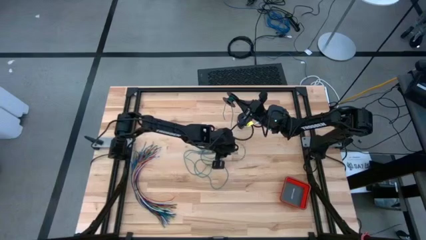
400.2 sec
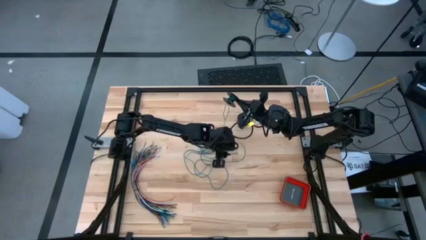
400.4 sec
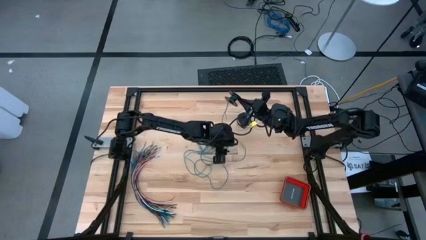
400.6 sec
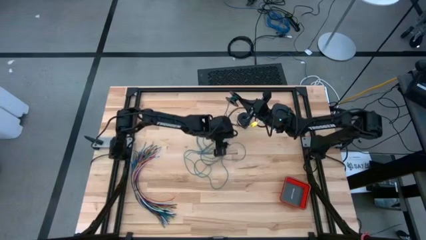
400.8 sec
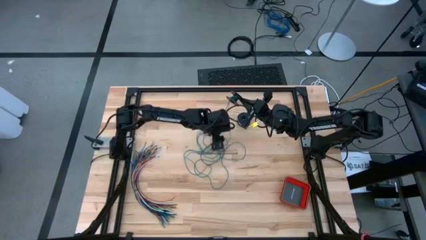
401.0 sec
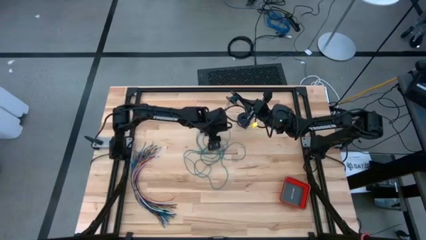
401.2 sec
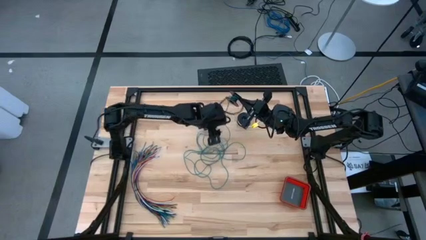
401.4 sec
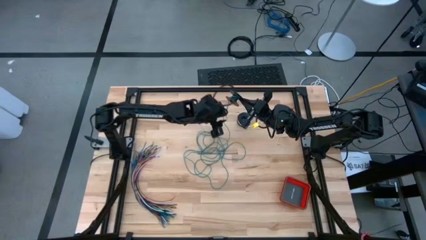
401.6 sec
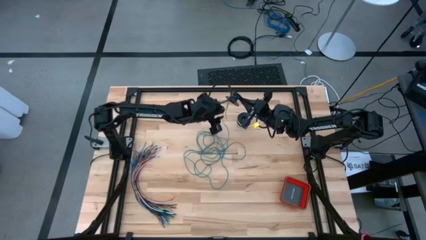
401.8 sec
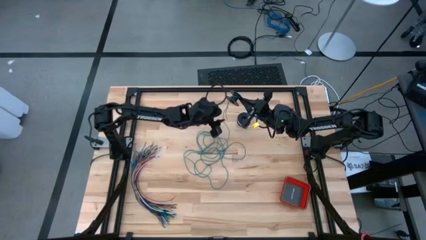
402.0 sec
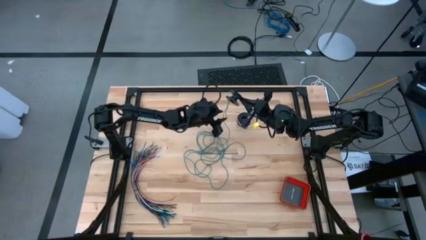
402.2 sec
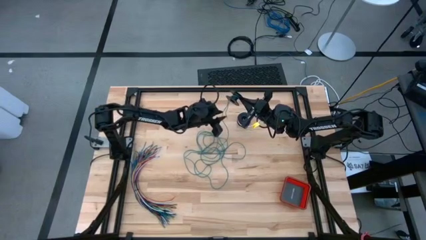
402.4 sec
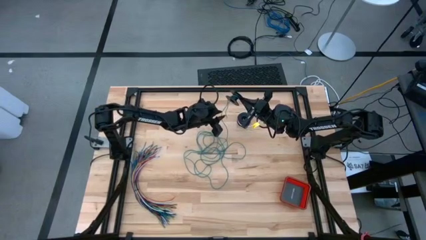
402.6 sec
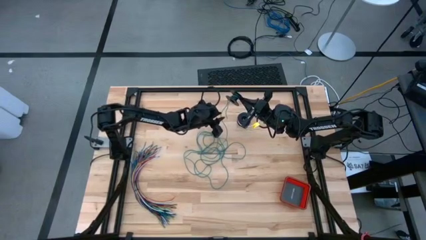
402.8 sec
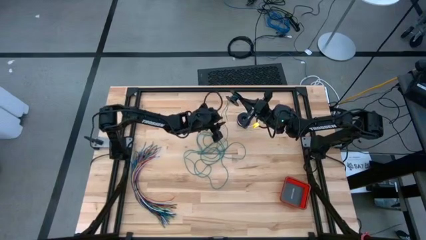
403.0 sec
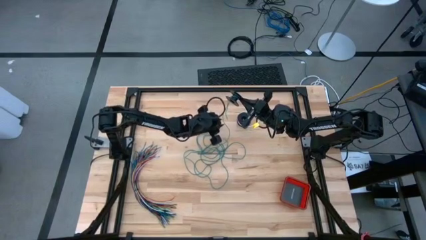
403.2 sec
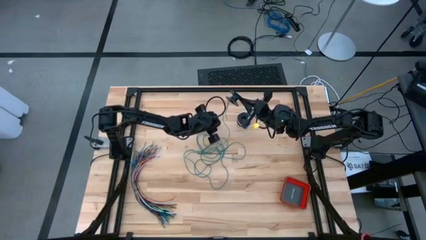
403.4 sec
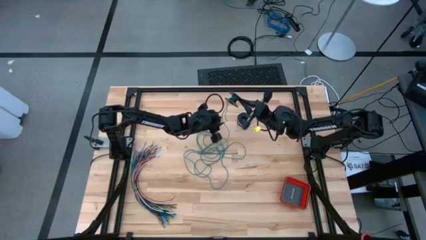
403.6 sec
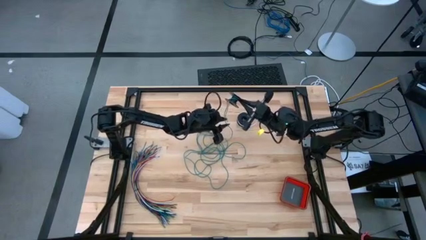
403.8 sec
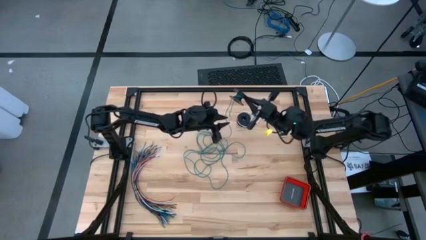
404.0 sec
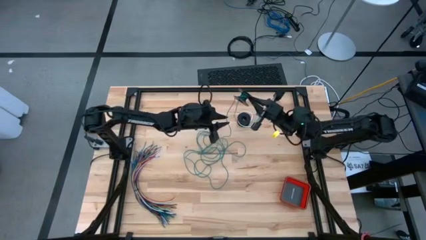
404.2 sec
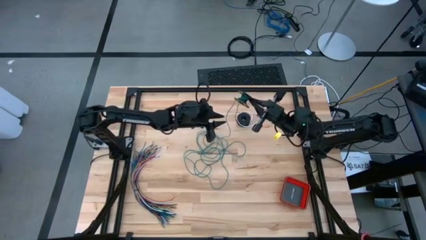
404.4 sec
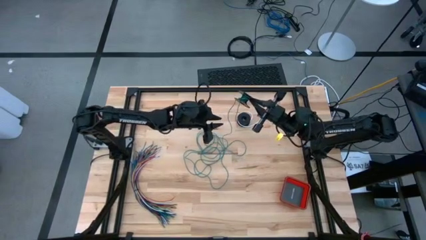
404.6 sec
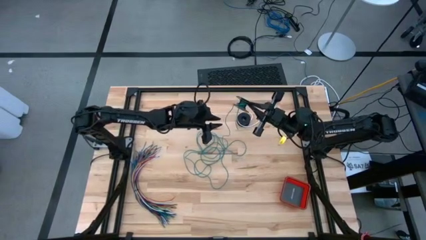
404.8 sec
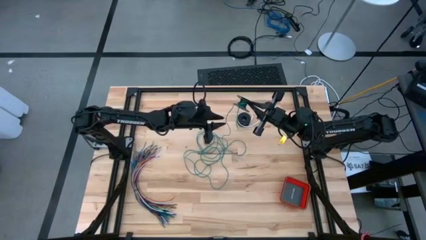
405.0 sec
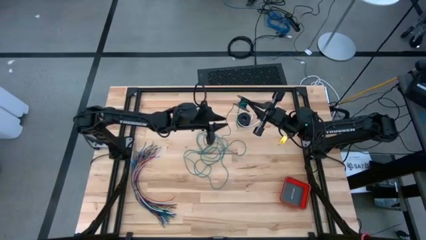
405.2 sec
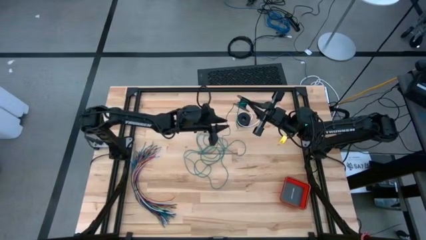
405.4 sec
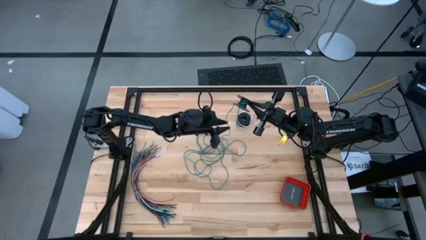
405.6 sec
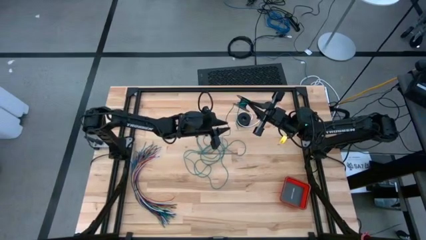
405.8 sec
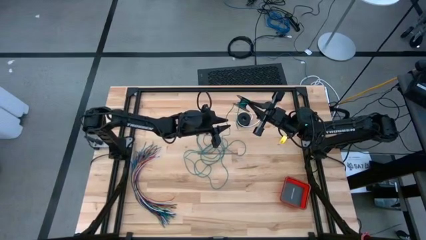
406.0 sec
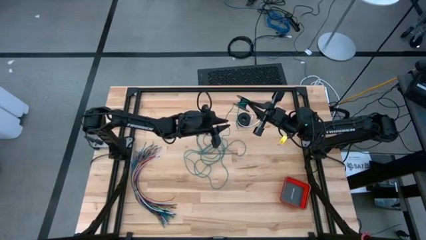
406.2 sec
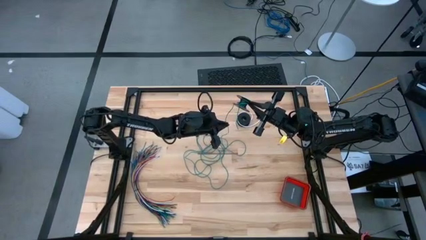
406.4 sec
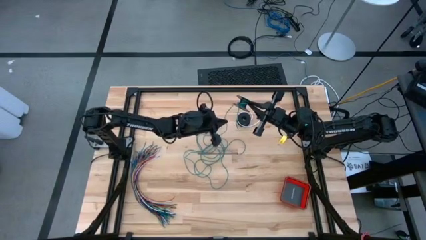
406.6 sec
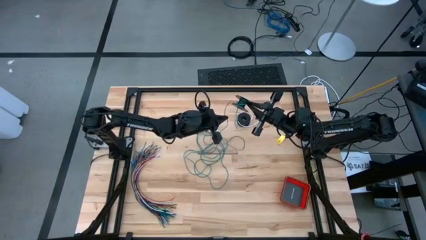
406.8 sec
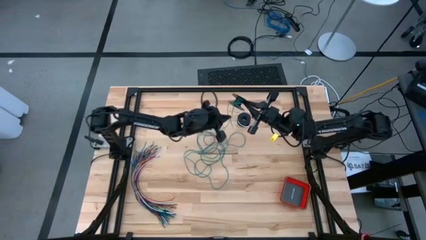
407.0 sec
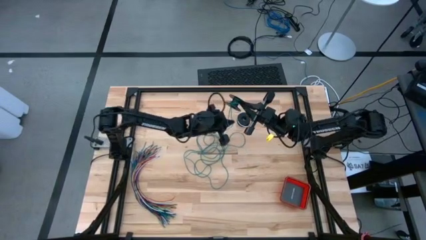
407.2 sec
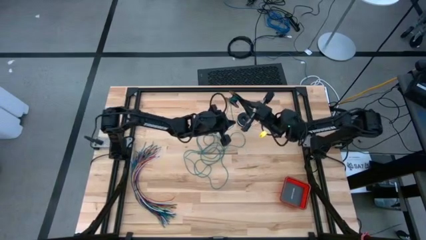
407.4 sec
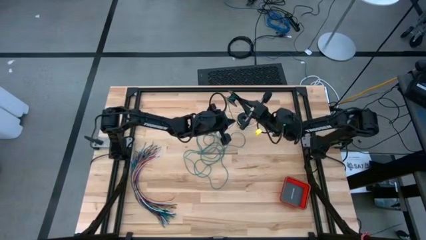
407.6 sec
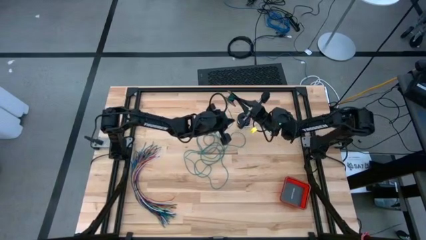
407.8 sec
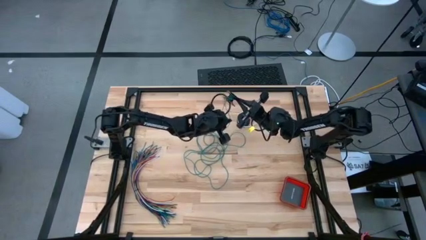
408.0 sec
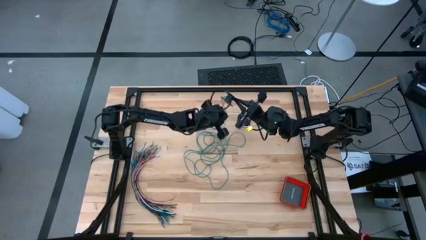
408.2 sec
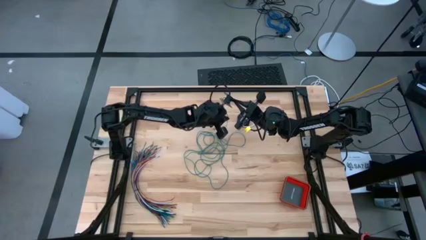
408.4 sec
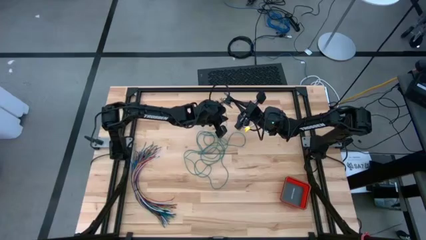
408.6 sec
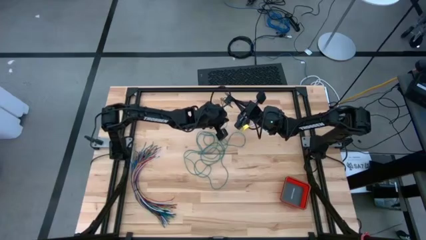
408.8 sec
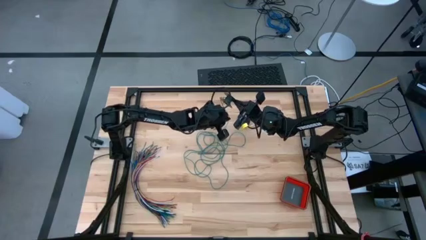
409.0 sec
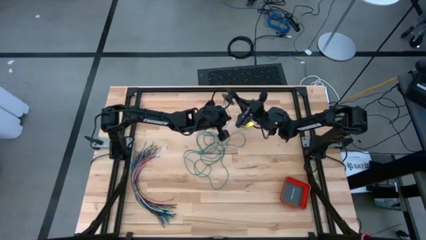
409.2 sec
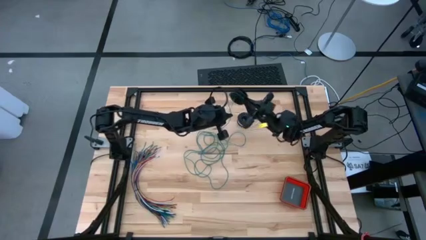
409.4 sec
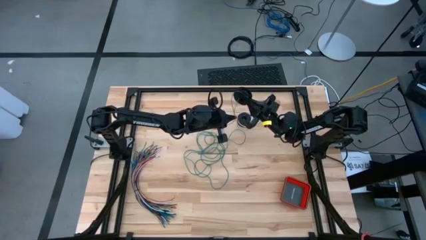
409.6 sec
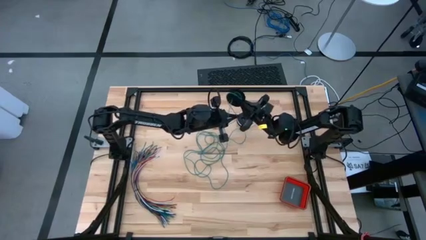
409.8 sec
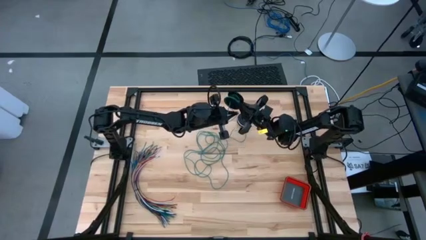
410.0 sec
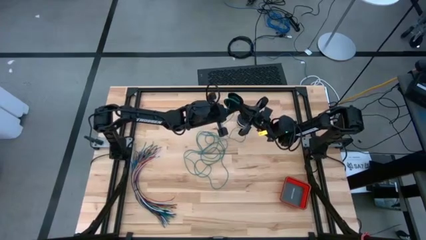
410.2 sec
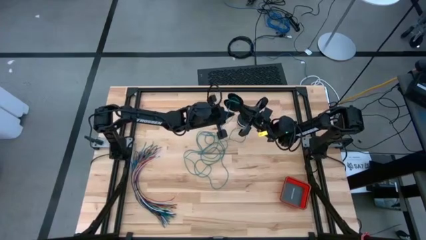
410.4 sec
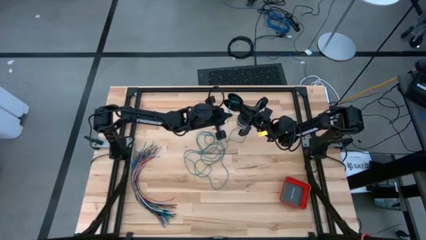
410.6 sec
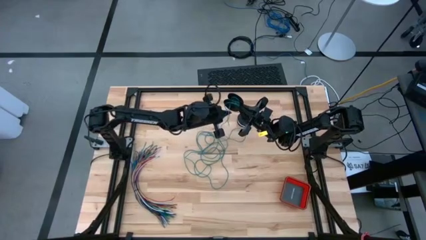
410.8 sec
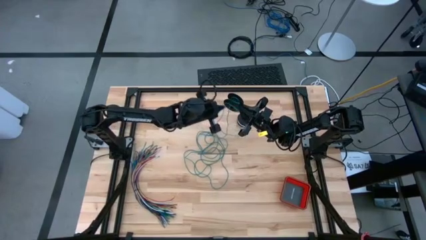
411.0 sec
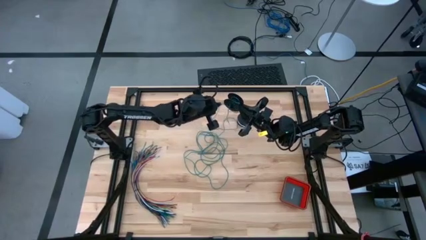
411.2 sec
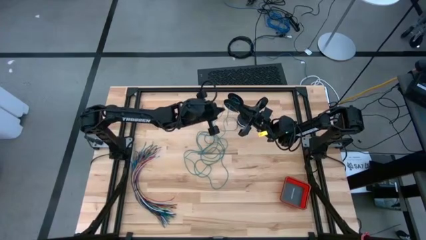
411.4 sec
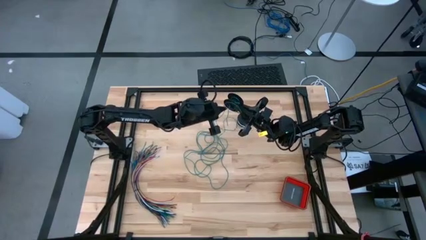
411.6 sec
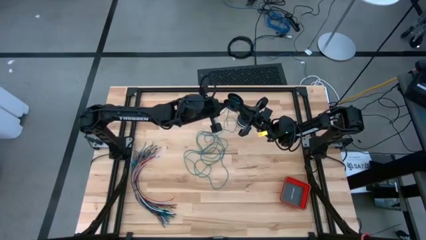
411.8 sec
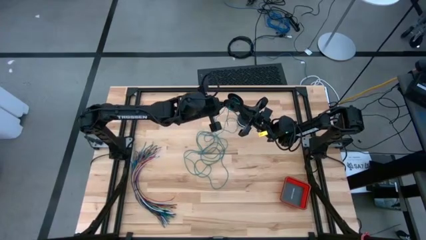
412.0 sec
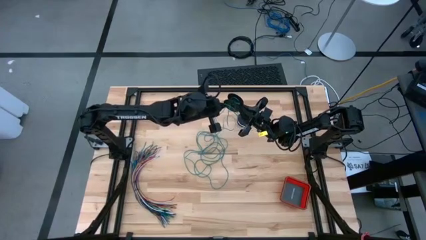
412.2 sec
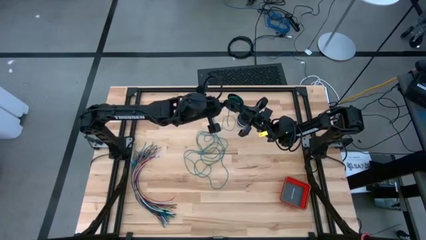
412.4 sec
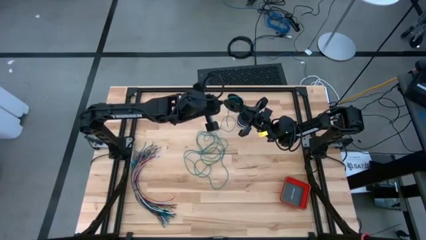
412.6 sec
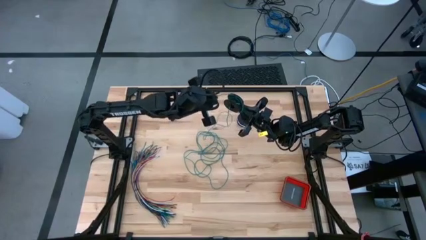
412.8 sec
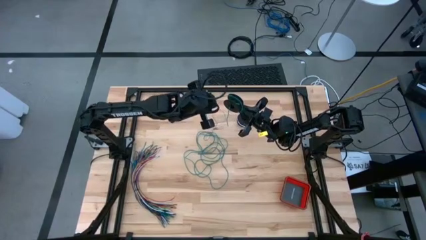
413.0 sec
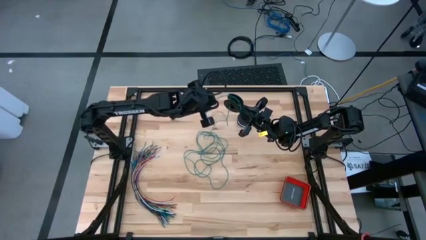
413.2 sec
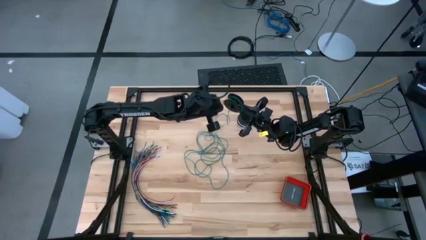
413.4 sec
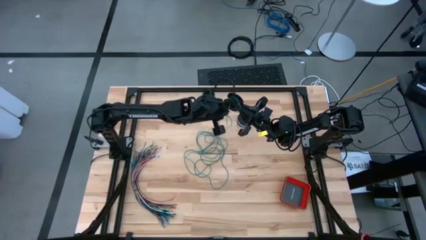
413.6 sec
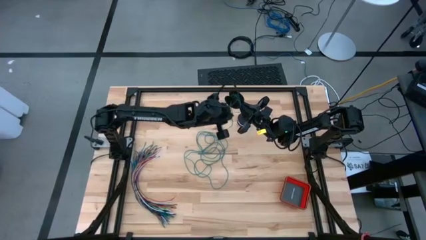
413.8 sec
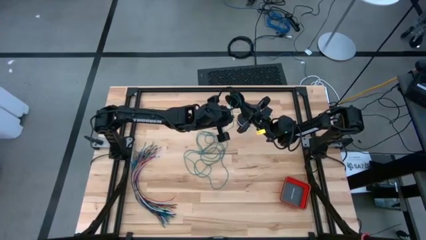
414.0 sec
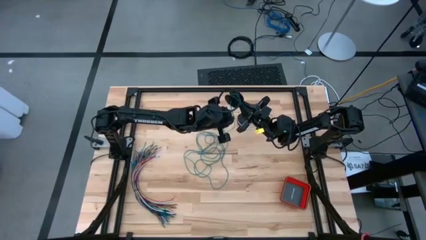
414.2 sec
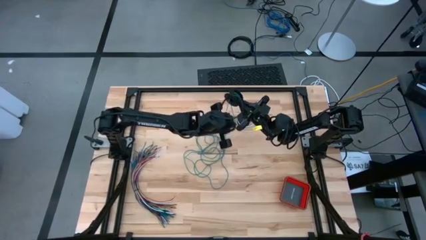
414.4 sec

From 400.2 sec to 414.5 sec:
Task: Coil cords
Coil the green wire onto the spool

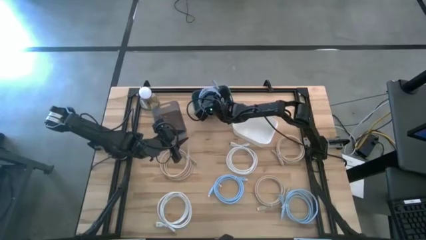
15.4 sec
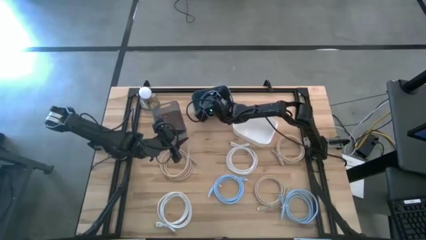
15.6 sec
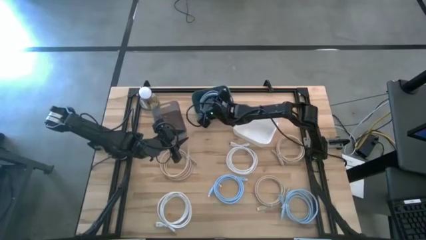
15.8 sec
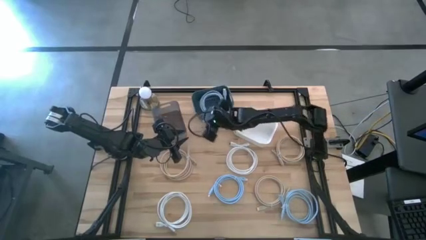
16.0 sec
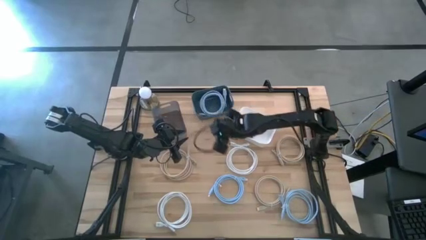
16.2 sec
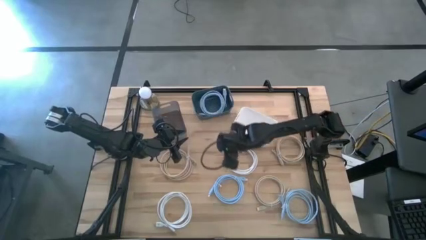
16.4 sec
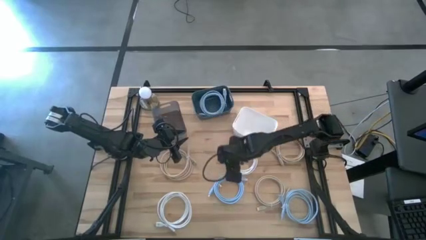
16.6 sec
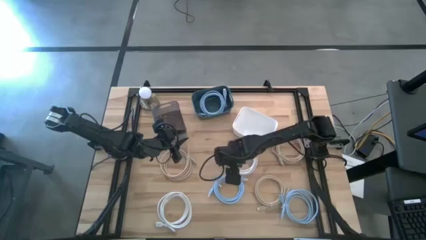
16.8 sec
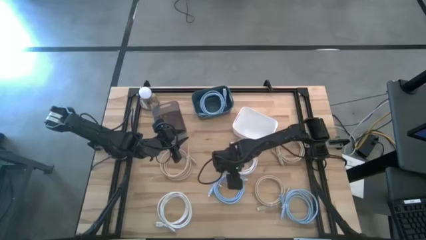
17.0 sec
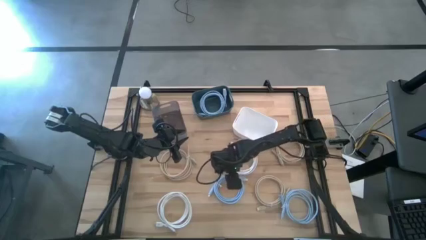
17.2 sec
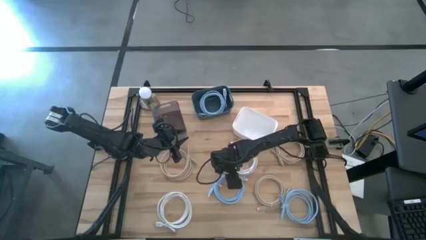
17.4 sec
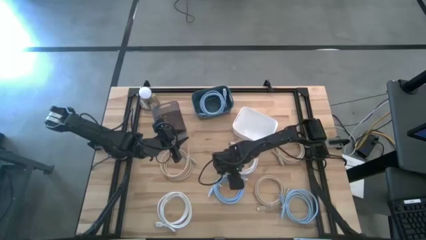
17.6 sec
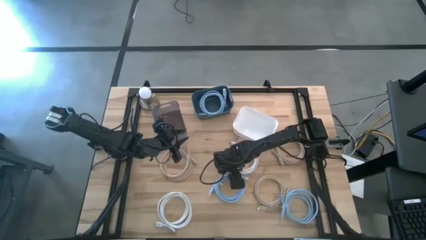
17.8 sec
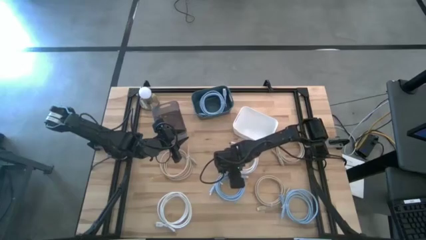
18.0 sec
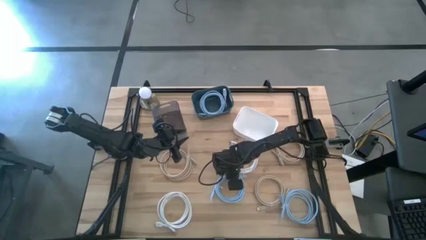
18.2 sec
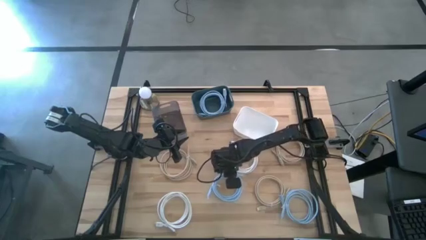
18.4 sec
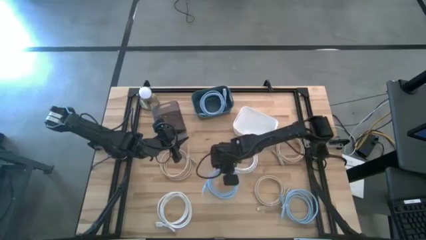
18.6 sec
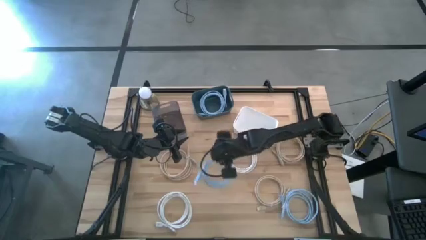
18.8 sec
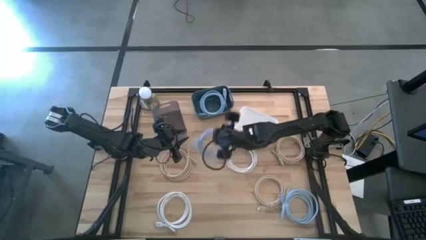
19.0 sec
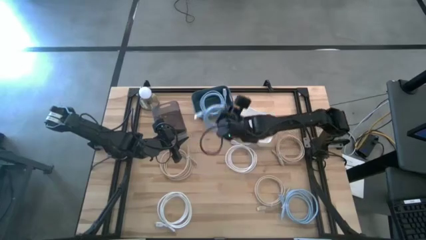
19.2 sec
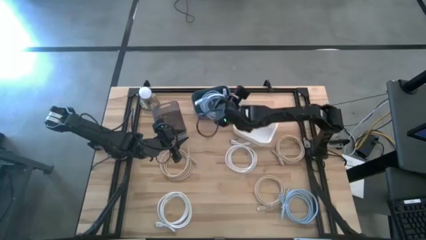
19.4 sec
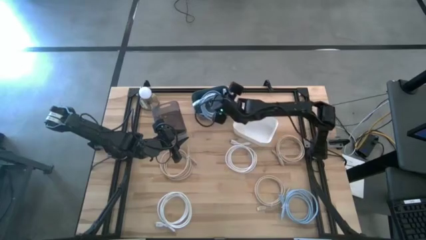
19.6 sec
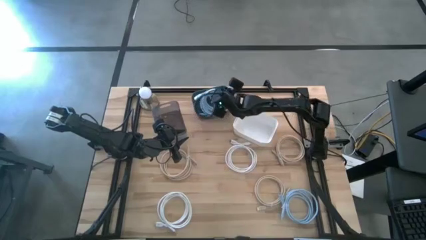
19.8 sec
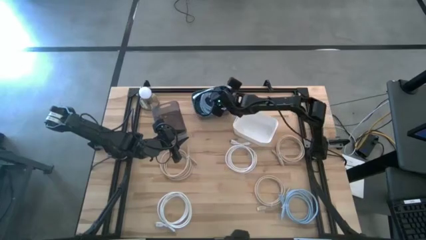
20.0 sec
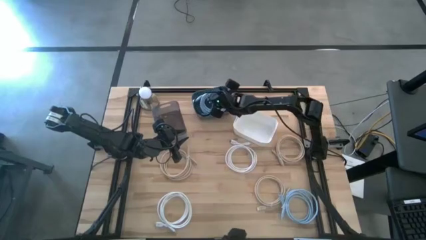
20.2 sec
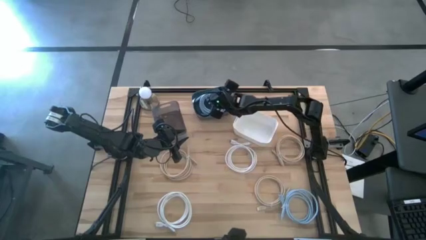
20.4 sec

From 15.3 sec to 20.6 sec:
Task: Sort HDMI cables
Put the left blue HDMI cable into the blue bin
